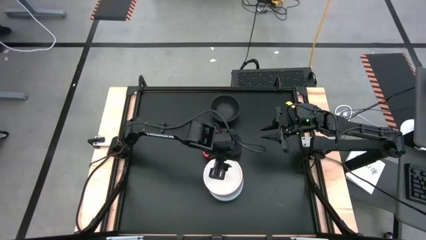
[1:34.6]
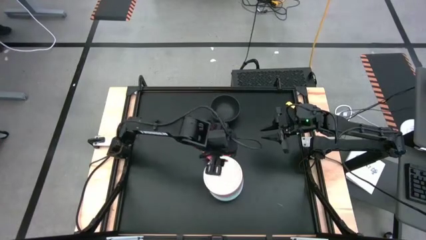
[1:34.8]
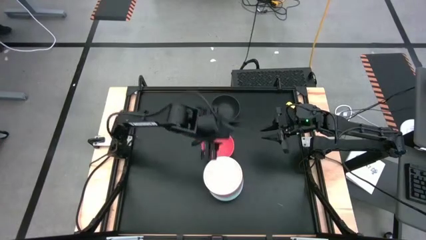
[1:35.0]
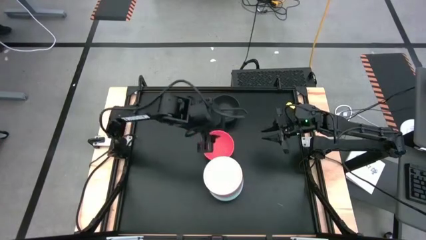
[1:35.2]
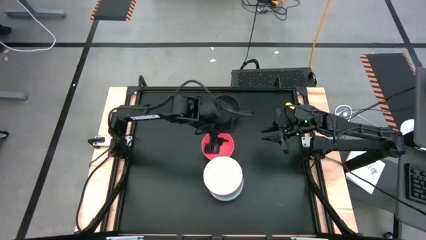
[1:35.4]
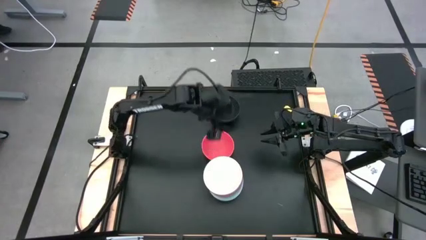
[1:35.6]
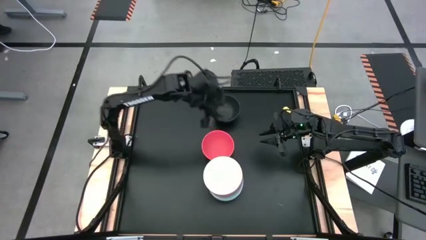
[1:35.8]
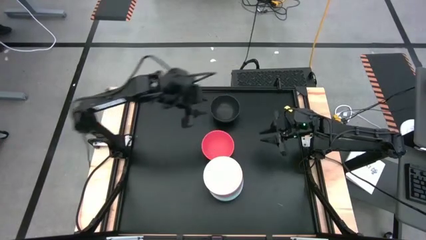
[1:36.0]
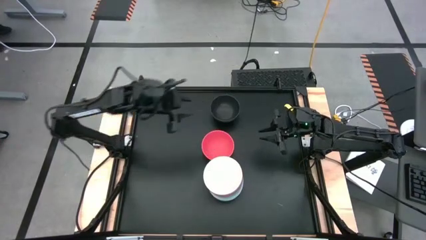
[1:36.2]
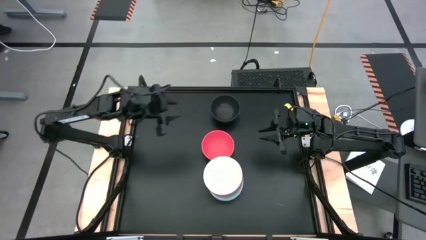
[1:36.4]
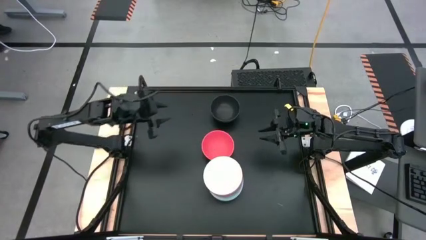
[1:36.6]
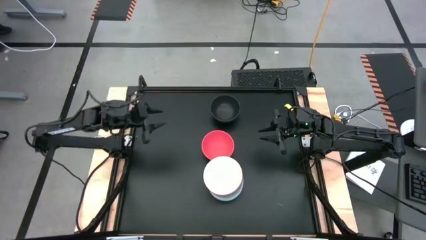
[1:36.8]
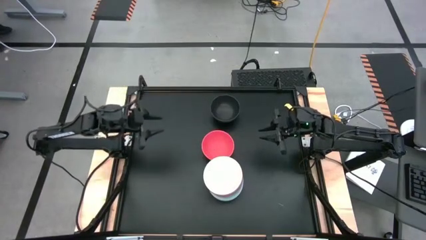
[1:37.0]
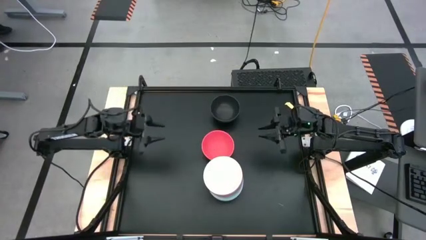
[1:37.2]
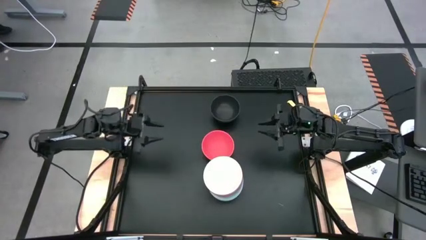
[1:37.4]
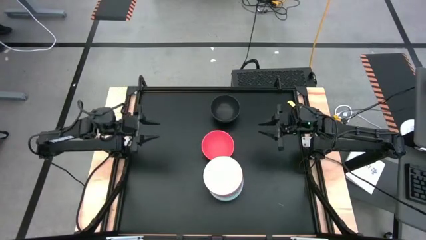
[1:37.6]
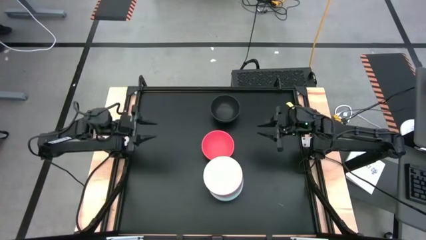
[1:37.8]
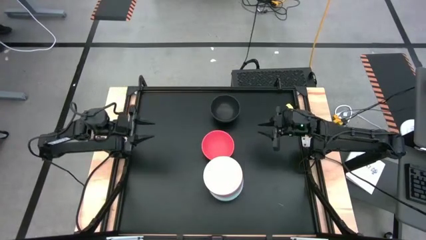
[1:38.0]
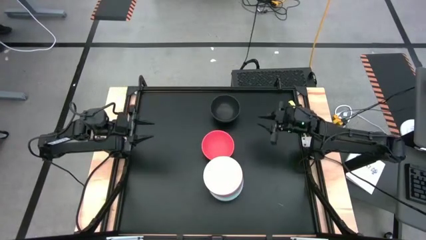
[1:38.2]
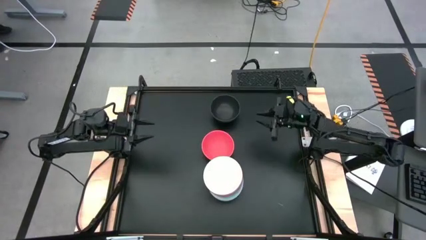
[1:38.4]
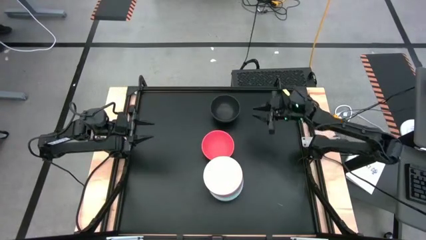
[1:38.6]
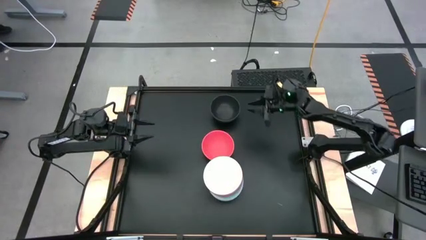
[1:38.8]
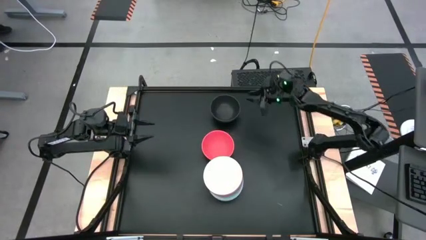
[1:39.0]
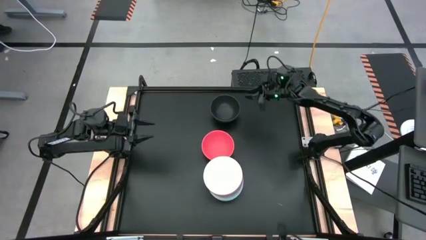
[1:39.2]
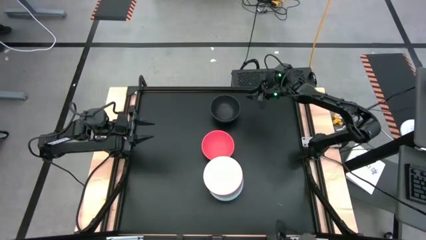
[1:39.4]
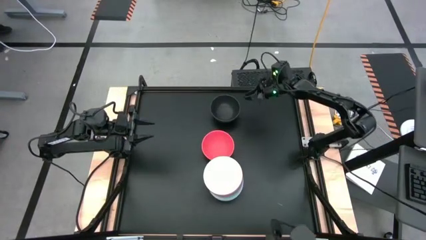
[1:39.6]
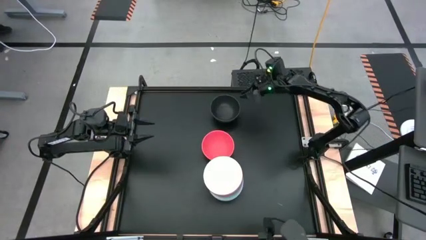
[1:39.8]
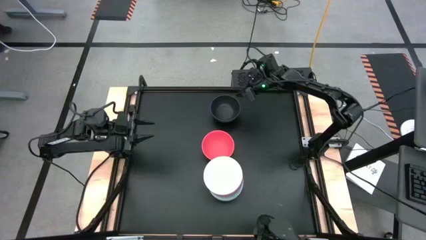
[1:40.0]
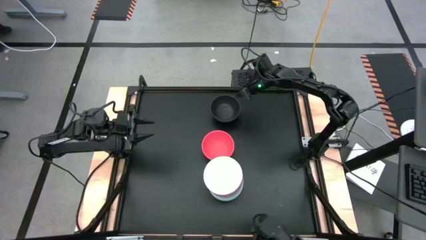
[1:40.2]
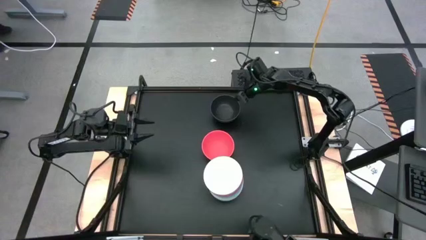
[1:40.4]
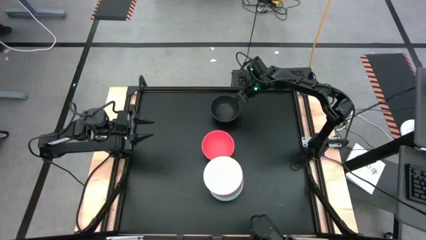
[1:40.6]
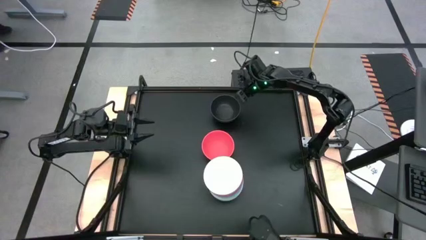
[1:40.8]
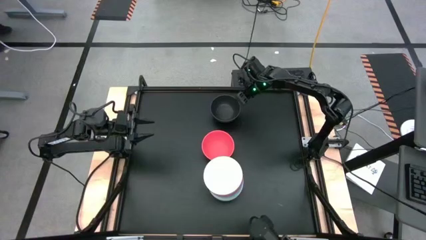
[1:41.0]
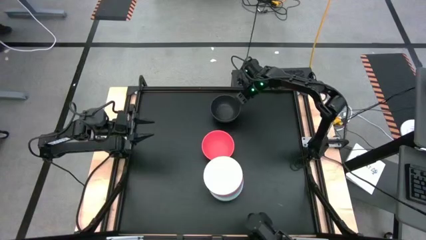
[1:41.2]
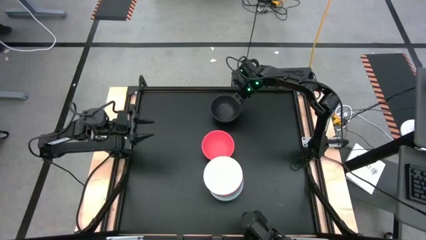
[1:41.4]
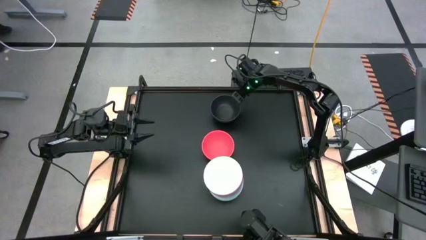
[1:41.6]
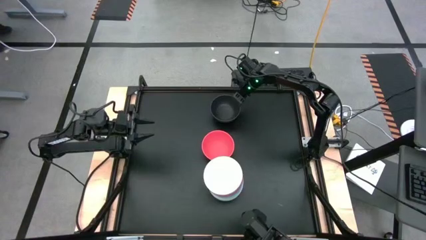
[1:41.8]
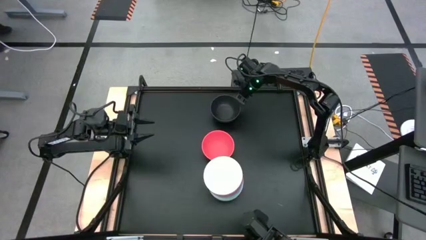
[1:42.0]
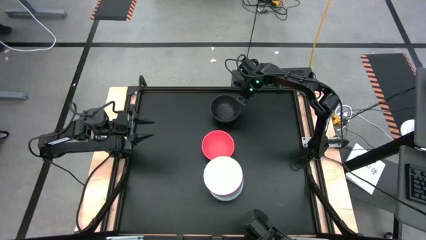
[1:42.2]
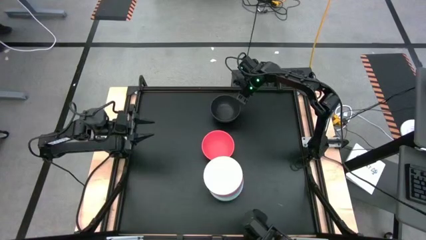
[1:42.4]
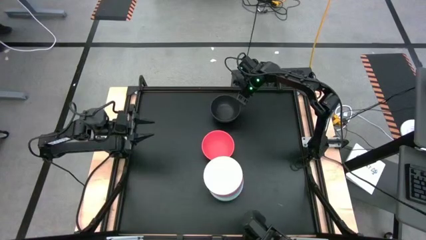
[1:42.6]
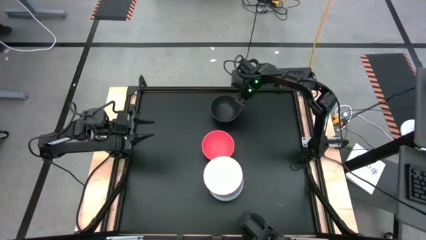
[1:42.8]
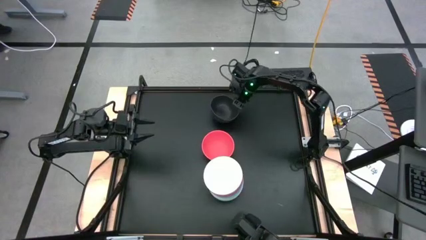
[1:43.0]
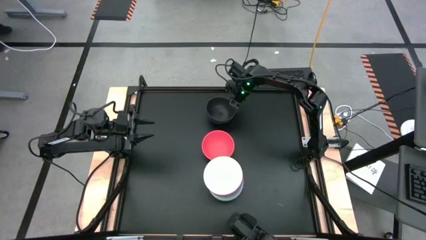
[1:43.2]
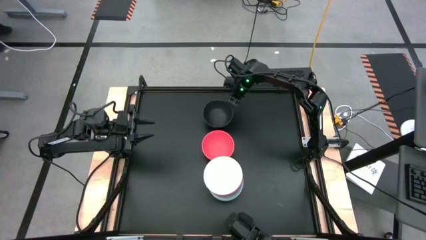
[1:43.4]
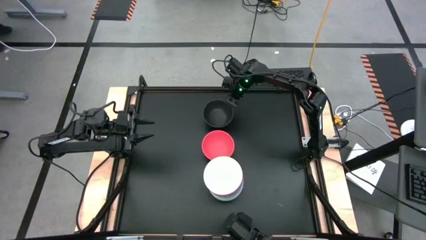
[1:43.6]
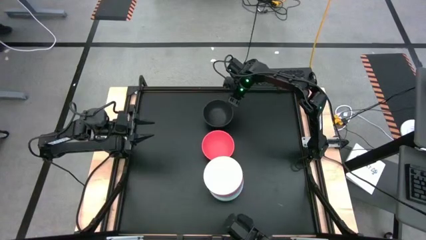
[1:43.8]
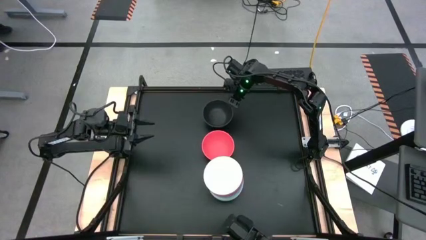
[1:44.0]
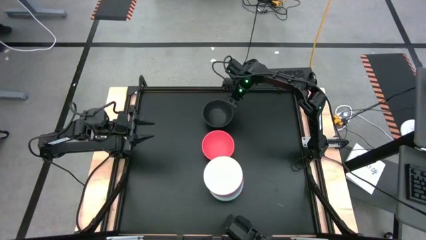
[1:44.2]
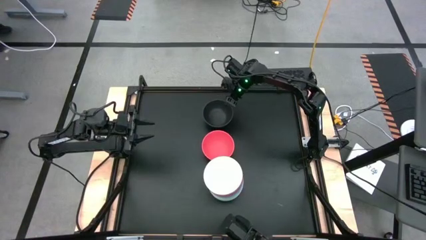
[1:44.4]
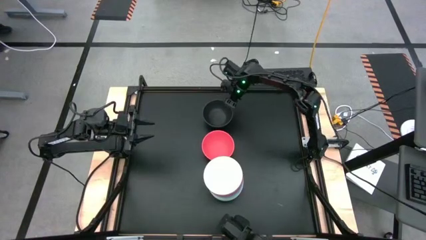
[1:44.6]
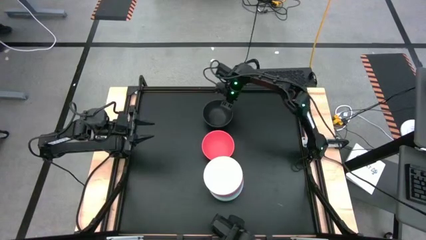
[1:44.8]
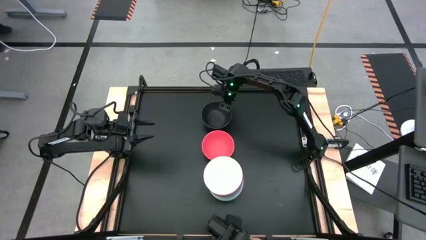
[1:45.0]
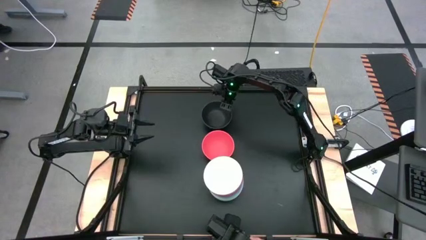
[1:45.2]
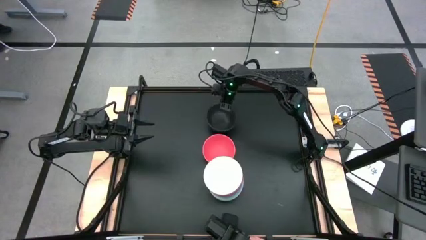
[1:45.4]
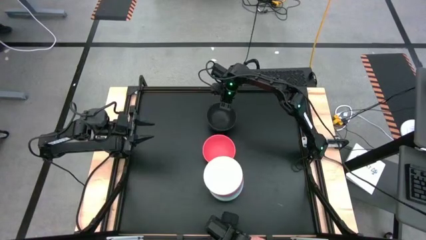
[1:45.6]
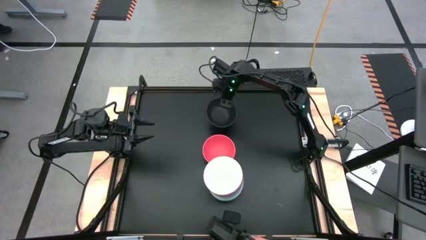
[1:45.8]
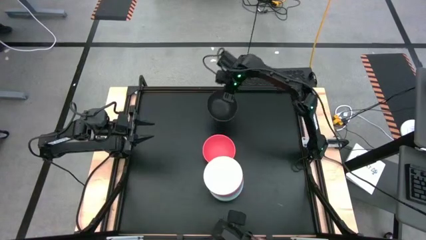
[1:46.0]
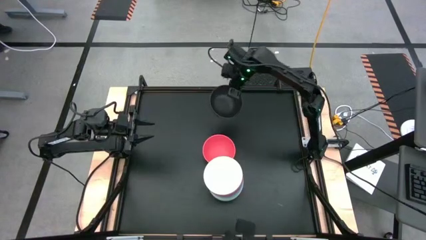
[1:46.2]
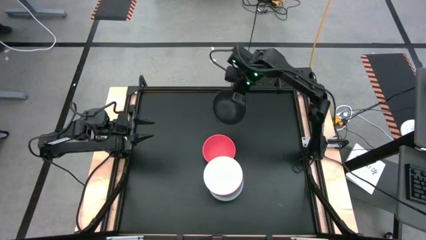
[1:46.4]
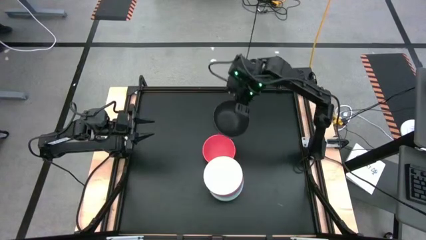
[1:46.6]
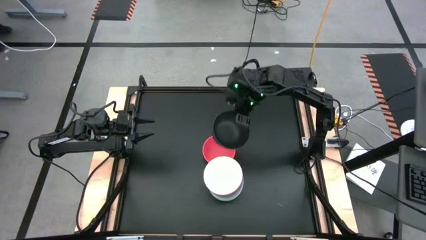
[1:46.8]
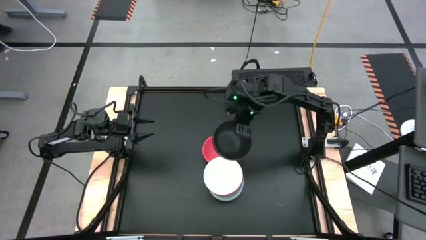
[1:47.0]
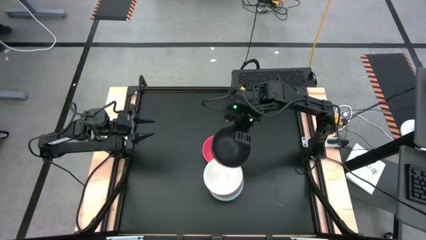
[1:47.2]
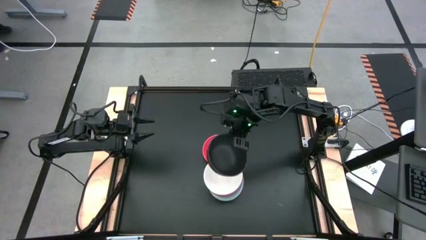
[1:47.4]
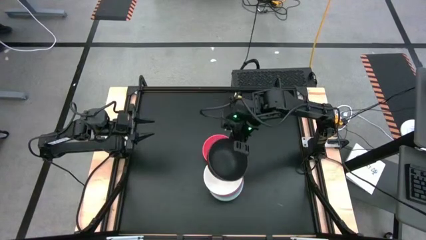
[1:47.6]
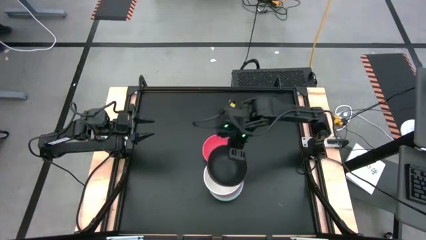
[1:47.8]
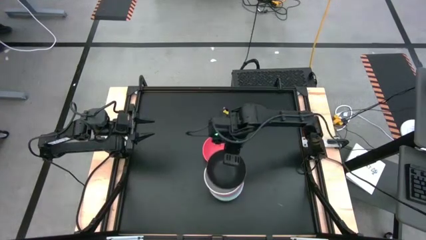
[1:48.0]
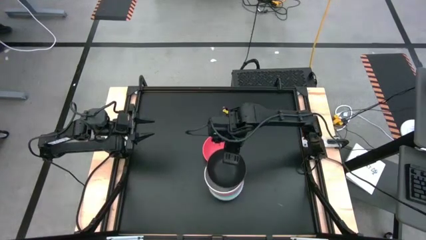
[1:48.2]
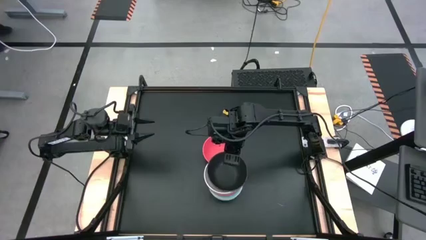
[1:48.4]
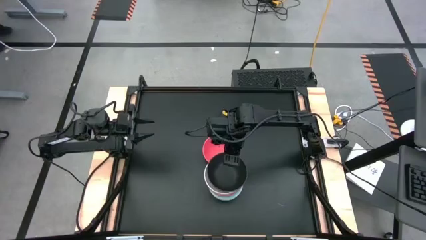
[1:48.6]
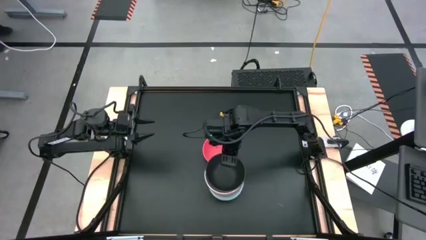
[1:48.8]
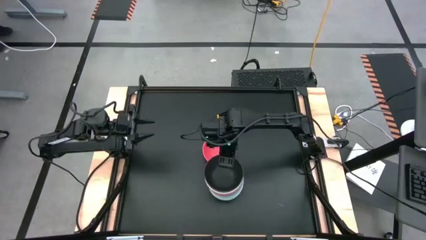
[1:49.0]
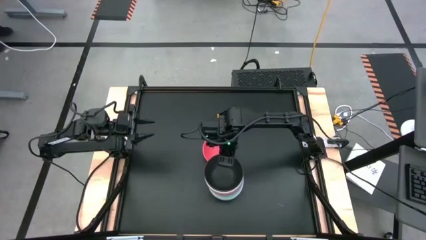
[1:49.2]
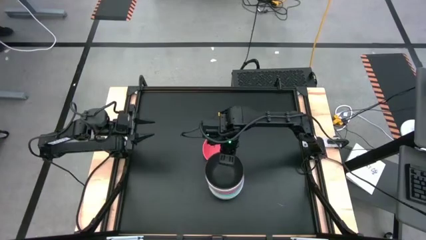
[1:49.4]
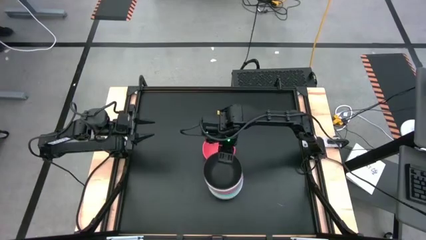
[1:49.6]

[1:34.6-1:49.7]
Task: Nest bowls inside each other
Stack the black bowl on the white bowl
